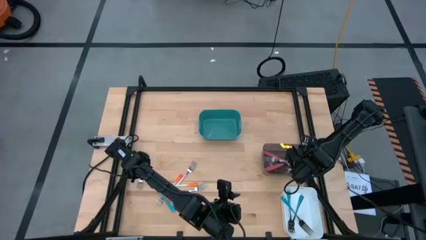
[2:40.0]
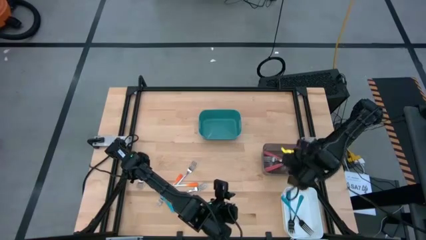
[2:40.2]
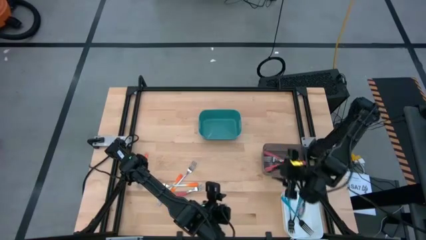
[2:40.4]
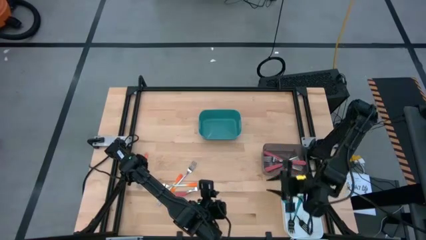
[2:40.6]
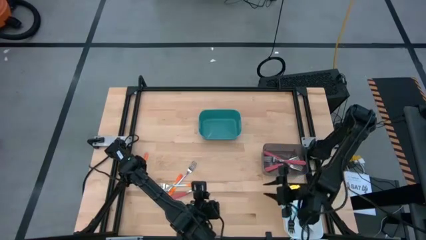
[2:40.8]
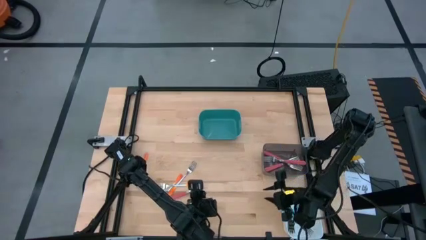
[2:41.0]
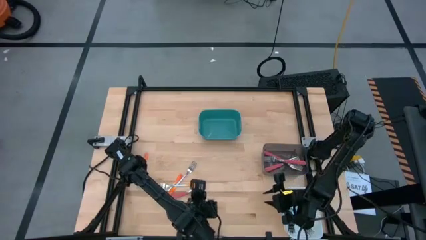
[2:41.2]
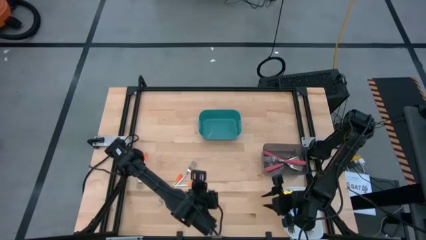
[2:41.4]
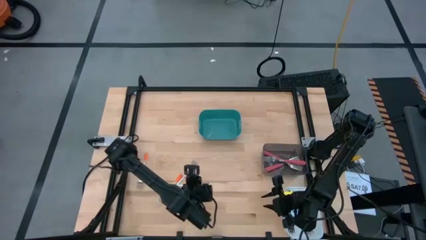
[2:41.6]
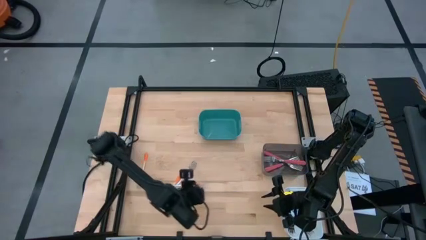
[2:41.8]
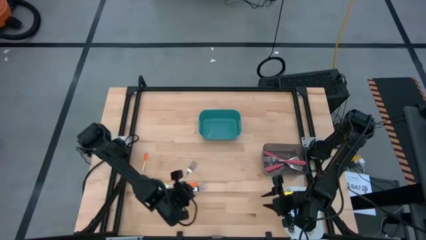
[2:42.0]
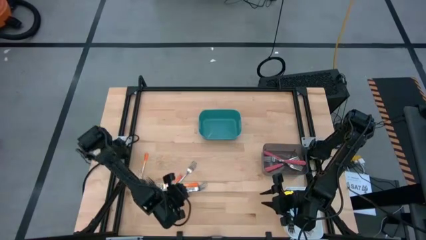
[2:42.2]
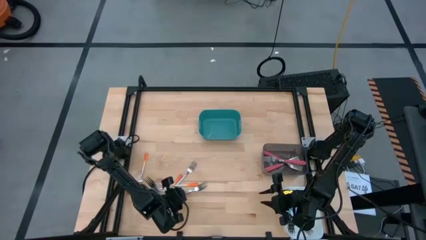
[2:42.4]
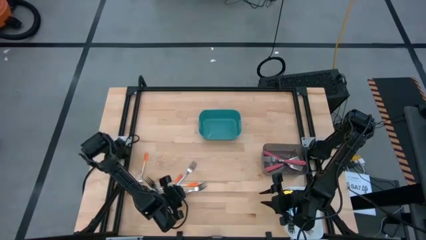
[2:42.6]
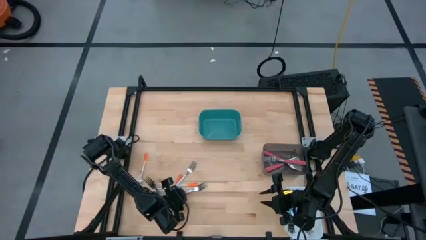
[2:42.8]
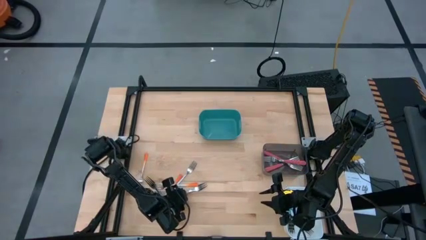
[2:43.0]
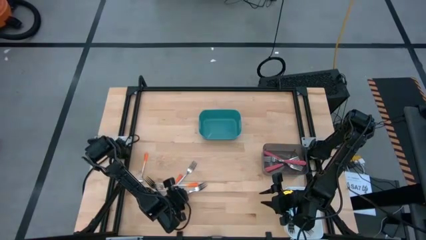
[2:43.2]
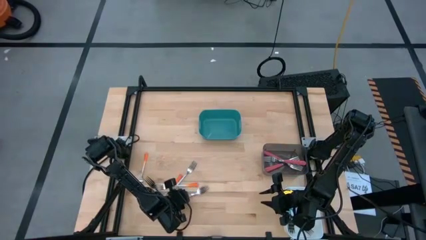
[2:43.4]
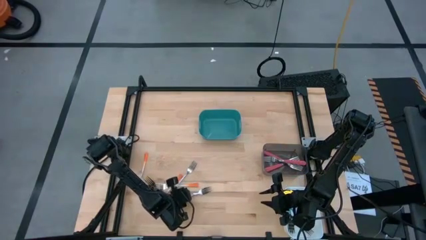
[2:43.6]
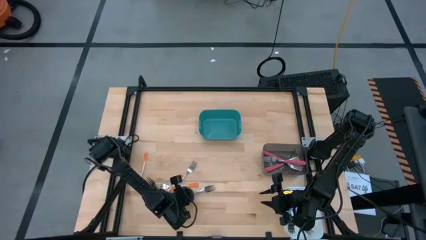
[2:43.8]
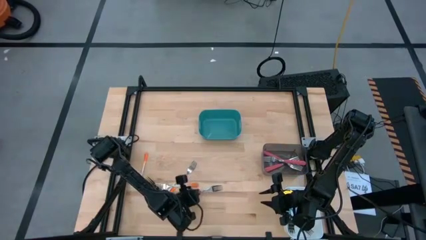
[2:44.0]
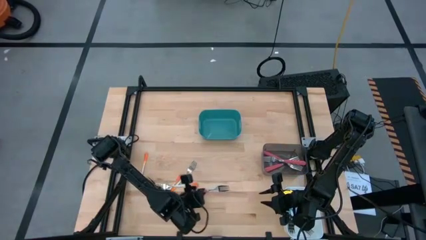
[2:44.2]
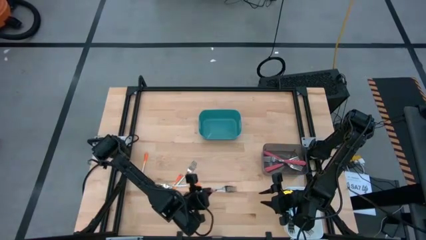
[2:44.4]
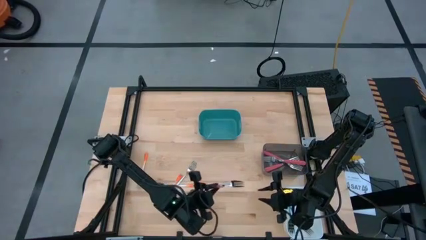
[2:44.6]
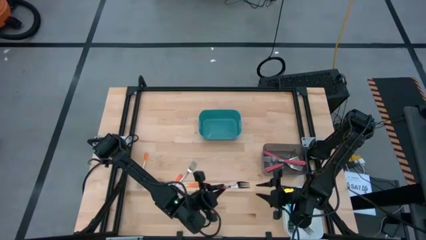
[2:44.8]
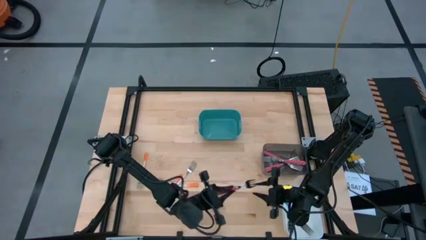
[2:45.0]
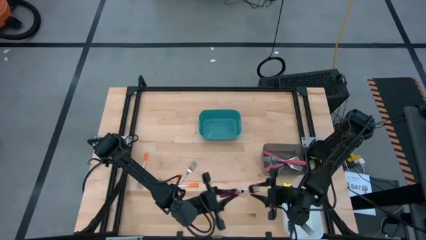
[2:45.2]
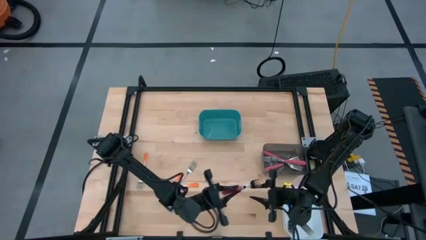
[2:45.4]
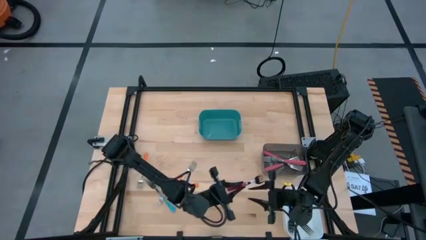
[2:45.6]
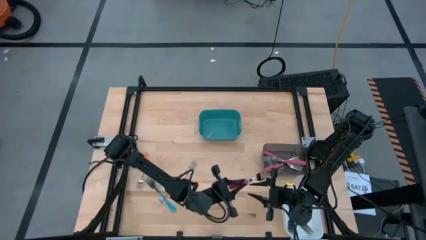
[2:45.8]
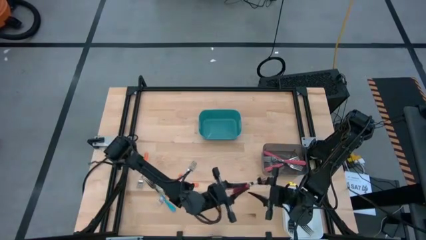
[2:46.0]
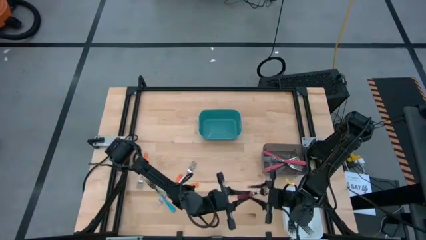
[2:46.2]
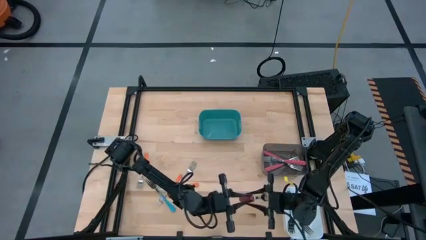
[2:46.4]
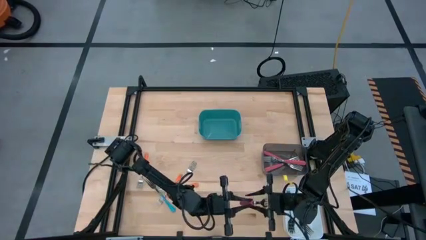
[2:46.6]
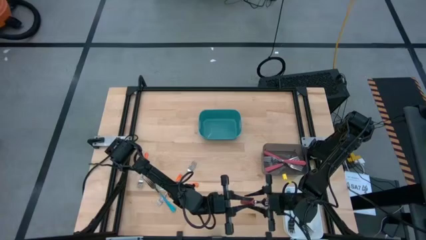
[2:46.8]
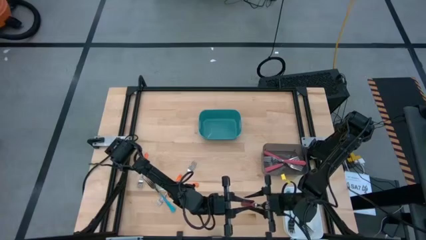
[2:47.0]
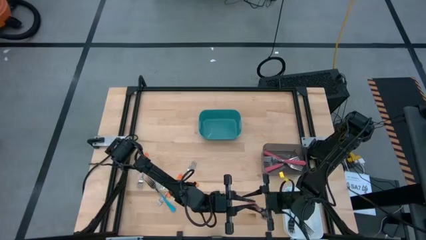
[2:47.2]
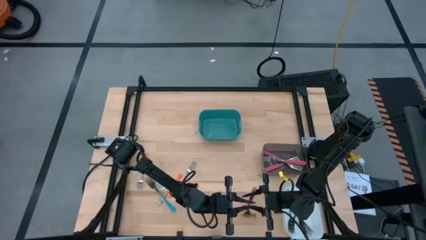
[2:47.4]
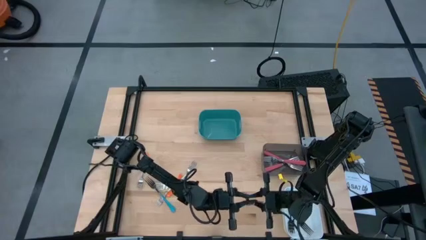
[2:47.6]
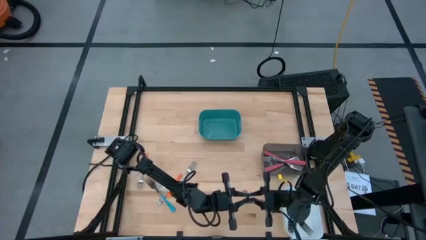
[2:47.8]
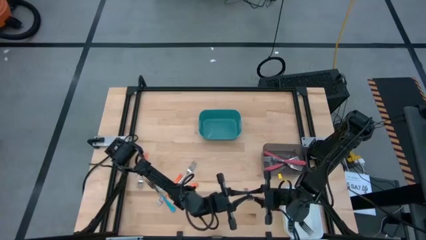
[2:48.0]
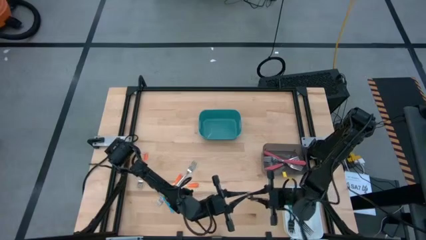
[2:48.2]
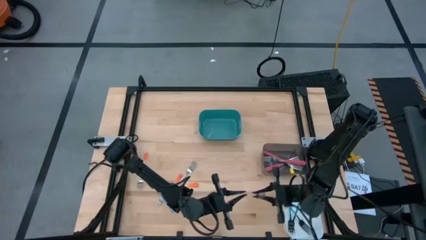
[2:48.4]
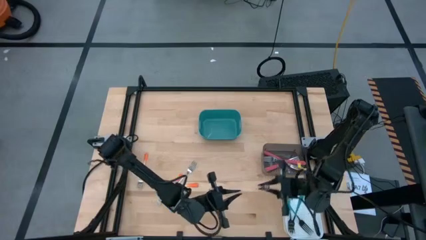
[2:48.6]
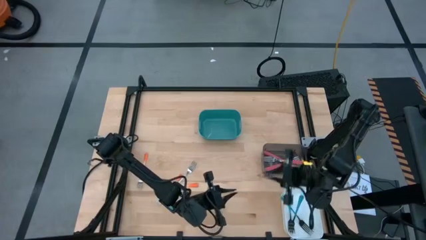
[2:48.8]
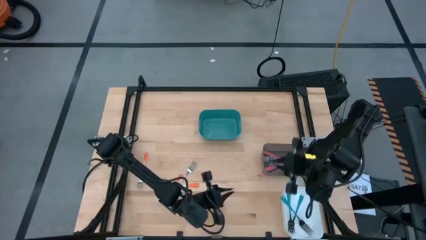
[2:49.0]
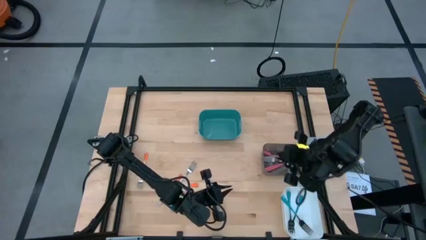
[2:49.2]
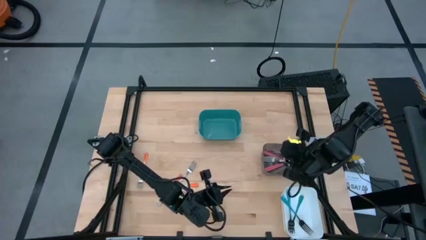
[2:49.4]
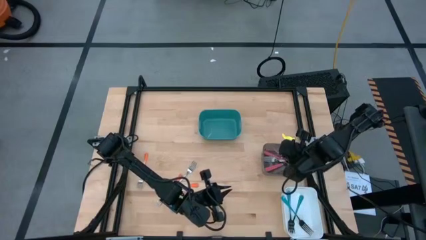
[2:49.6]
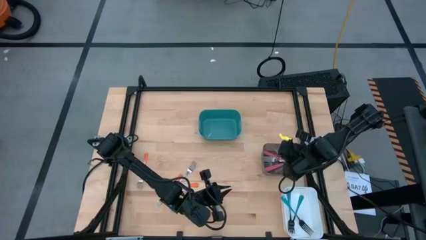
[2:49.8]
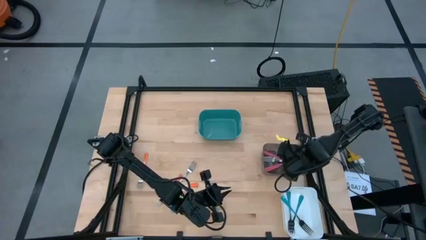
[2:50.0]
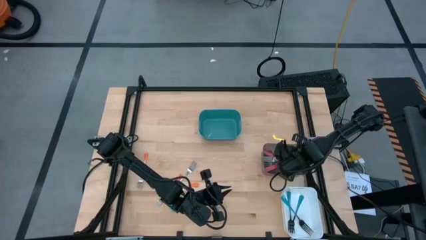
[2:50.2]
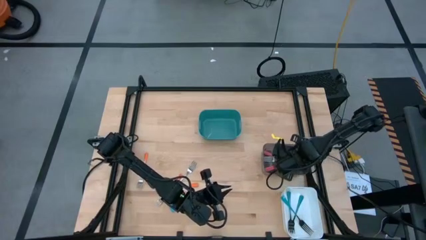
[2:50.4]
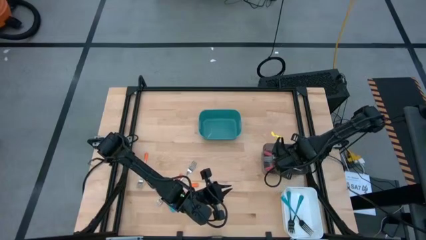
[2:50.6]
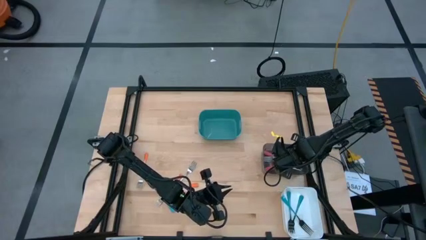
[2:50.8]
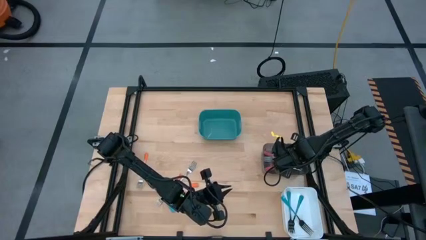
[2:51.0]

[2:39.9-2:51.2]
Task: Sort silverware by color (type)
Put the pink fork into the black bin

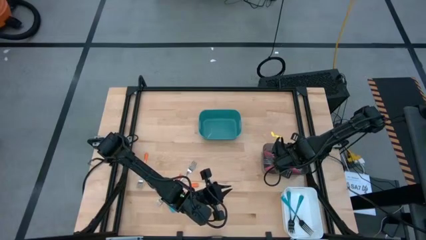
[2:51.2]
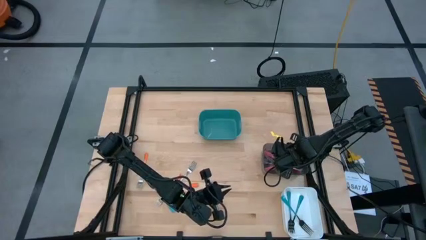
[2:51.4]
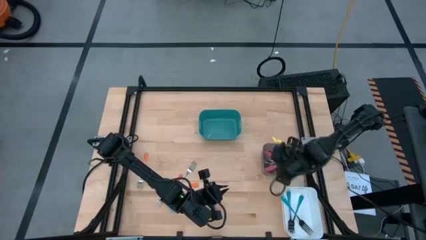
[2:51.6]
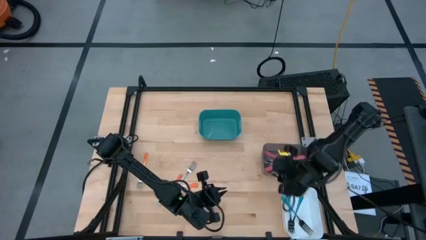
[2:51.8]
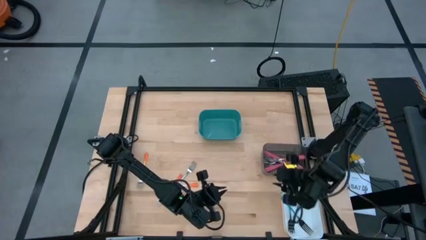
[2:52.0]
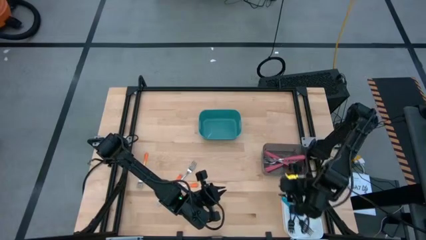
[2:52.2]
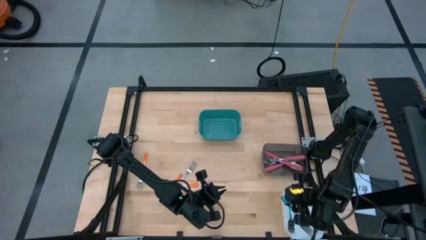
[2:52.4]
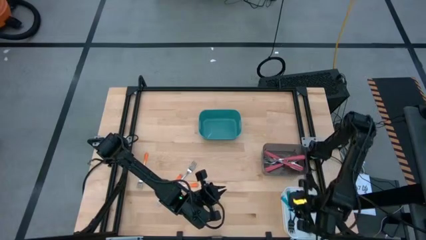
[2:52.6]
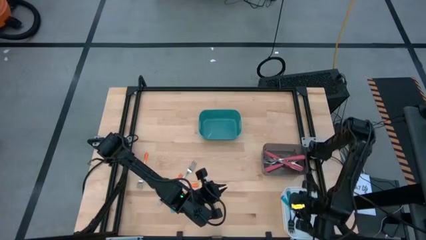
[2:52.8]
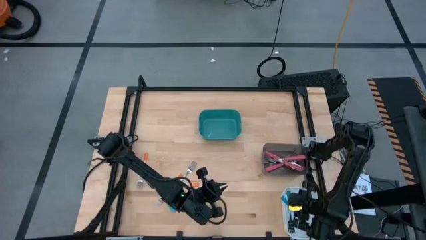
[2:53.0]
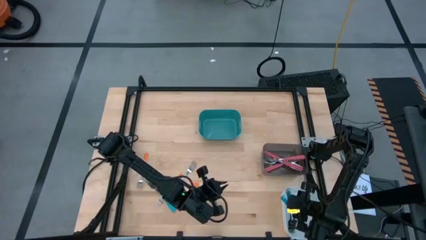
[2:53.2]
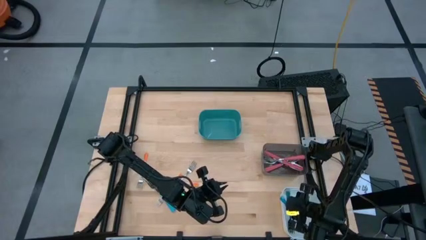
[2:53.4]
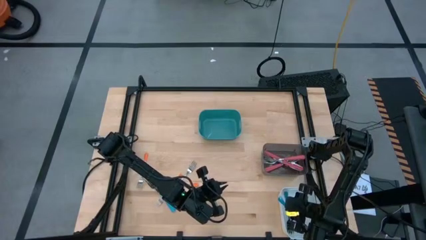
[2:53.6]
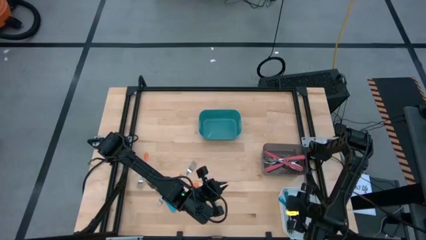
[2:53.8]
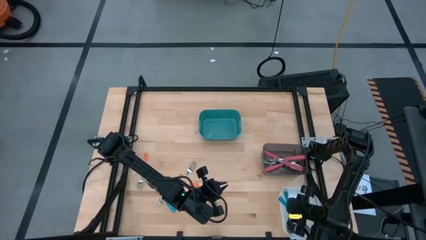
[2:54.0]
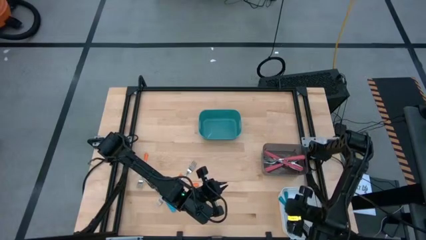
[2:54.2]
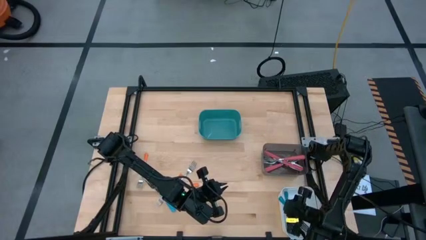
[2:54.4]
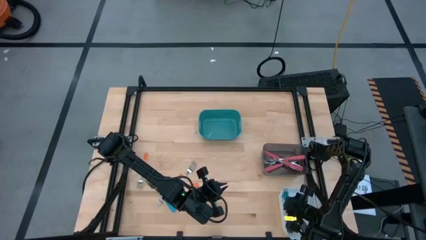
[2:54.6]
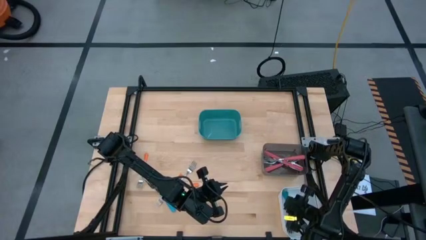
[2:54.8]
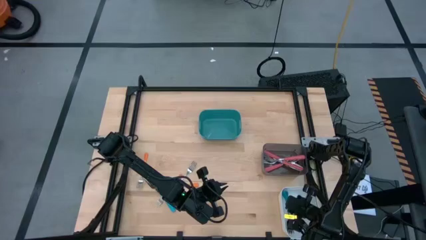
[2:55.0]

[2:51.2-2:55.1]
Adjust the blue fork in the white bin
